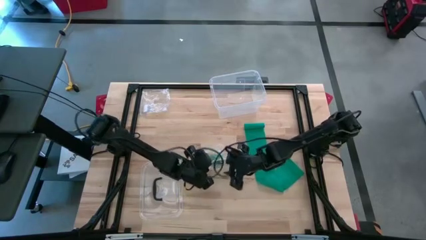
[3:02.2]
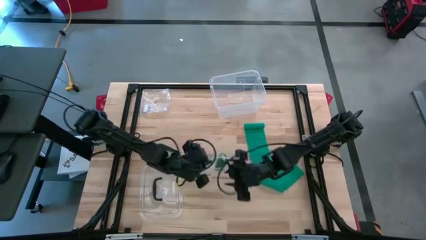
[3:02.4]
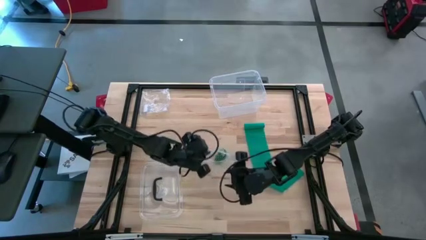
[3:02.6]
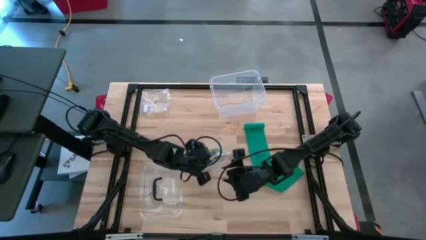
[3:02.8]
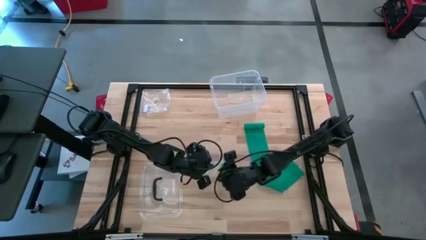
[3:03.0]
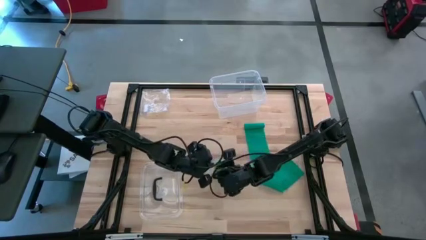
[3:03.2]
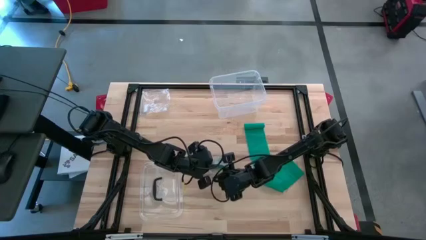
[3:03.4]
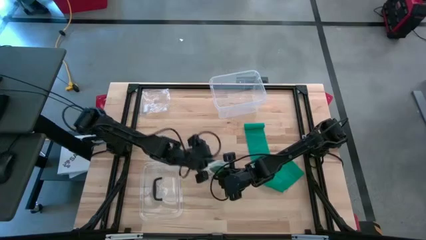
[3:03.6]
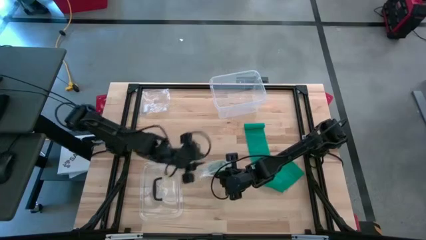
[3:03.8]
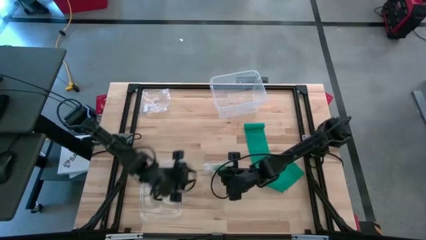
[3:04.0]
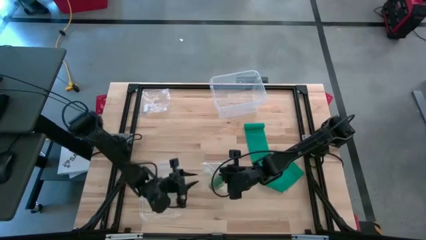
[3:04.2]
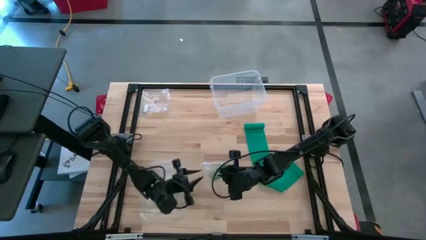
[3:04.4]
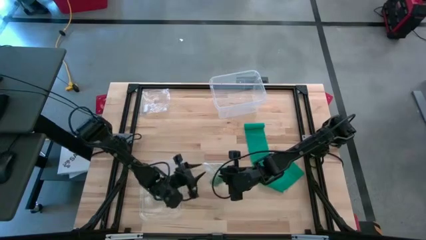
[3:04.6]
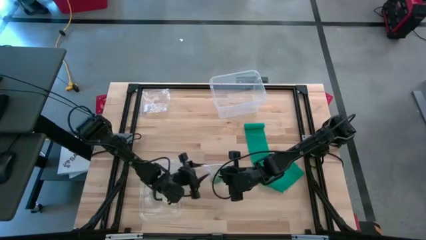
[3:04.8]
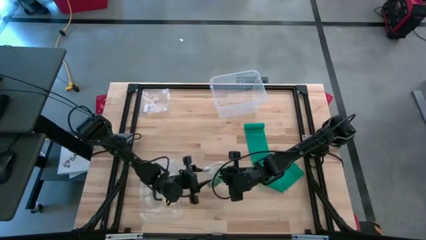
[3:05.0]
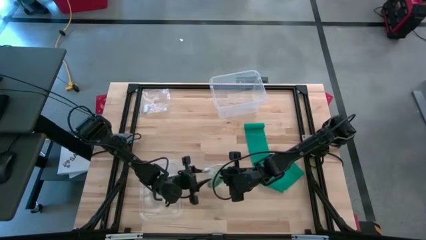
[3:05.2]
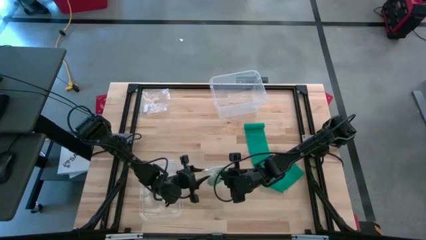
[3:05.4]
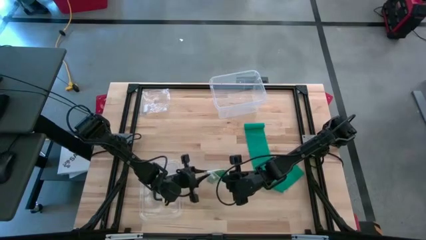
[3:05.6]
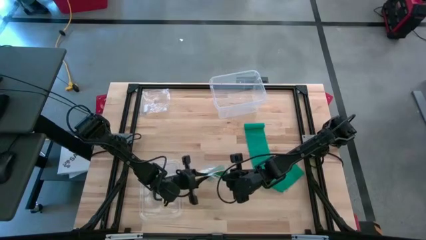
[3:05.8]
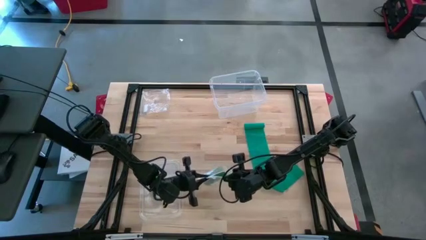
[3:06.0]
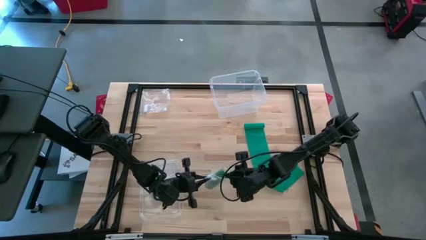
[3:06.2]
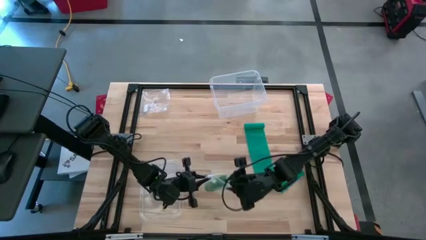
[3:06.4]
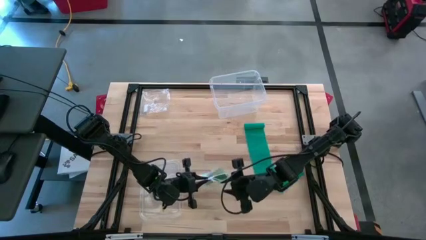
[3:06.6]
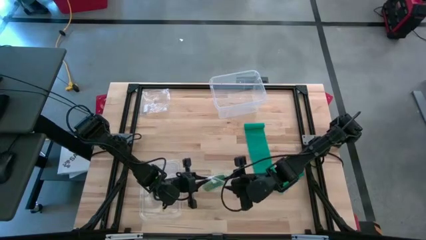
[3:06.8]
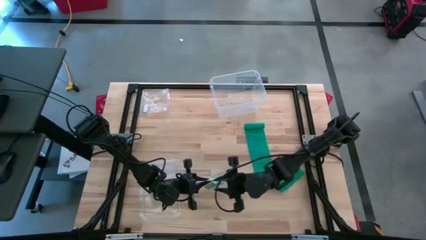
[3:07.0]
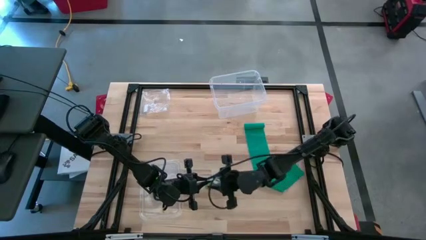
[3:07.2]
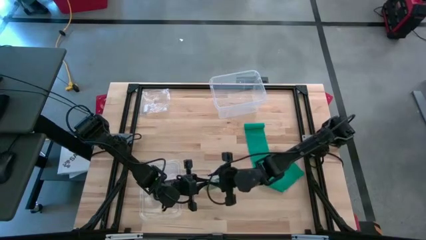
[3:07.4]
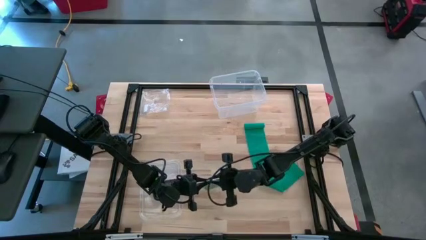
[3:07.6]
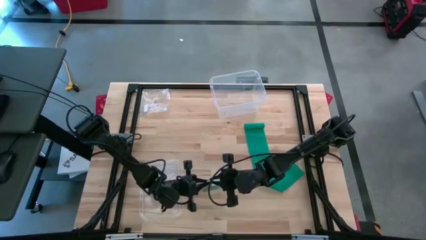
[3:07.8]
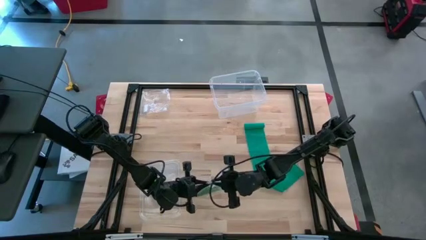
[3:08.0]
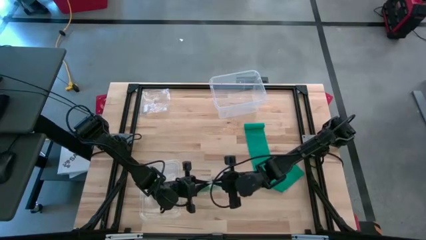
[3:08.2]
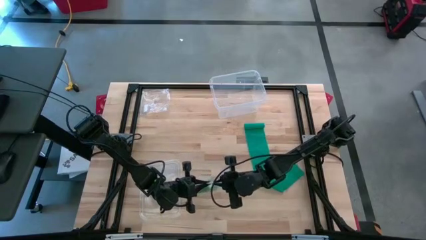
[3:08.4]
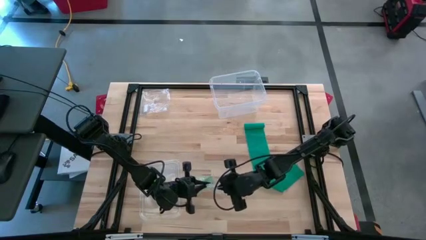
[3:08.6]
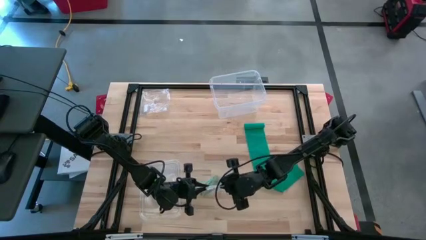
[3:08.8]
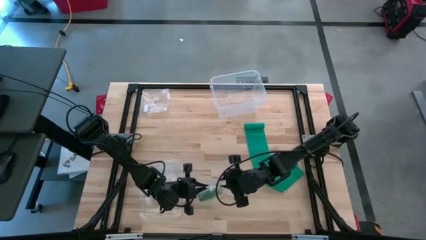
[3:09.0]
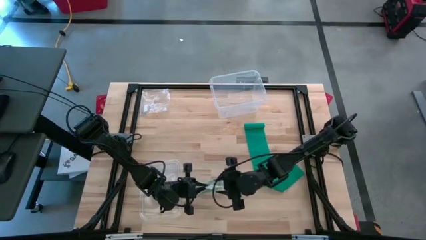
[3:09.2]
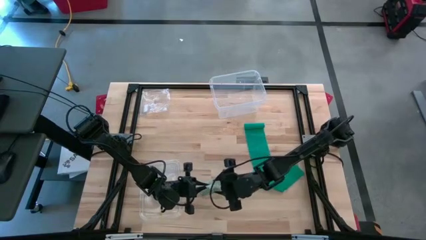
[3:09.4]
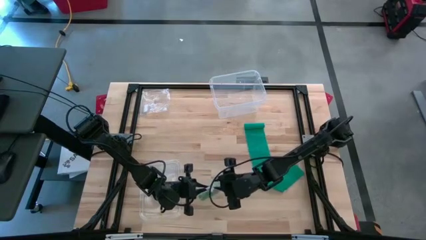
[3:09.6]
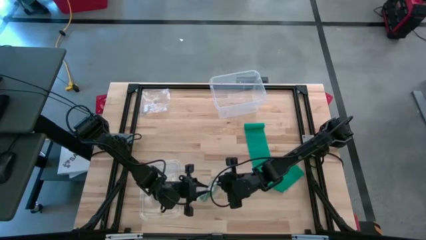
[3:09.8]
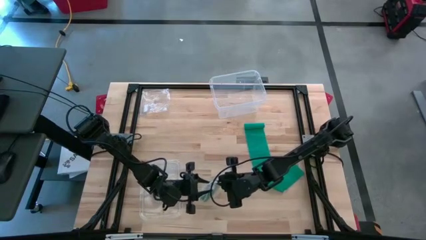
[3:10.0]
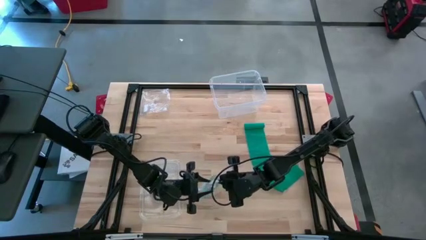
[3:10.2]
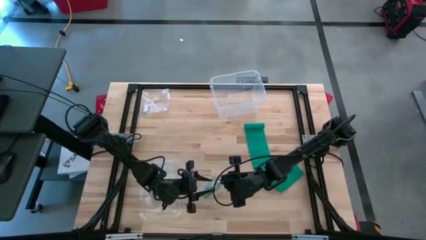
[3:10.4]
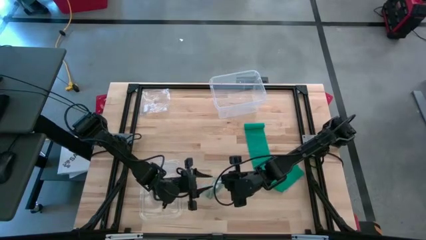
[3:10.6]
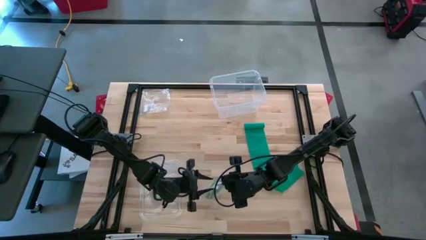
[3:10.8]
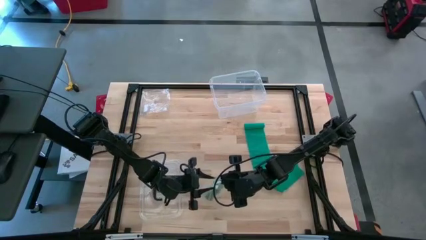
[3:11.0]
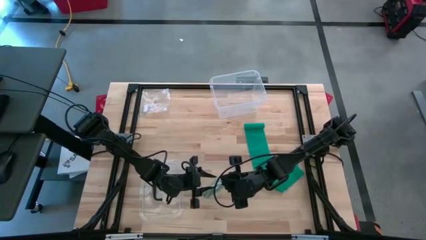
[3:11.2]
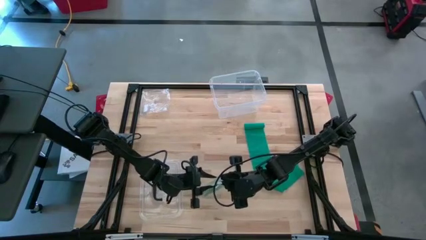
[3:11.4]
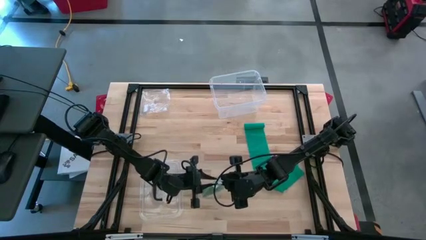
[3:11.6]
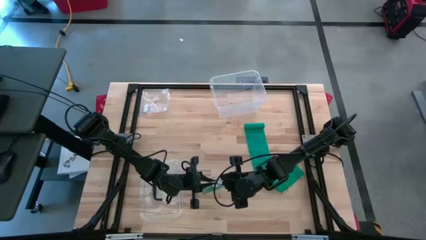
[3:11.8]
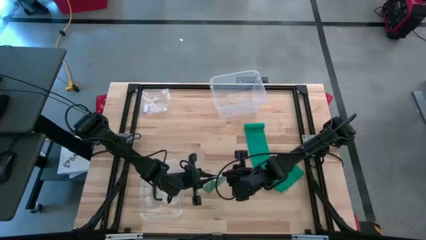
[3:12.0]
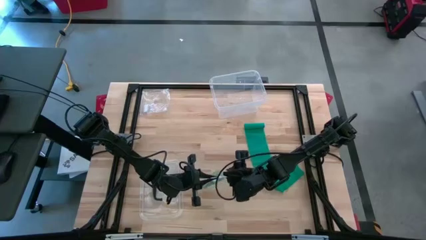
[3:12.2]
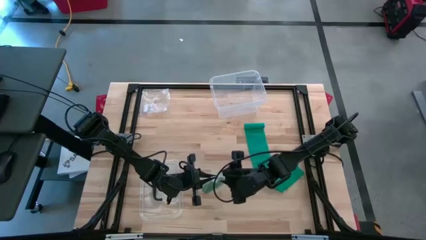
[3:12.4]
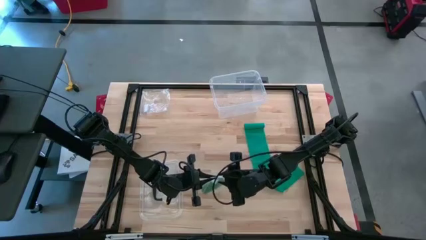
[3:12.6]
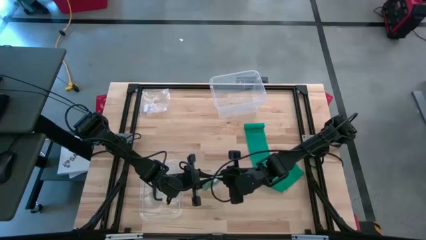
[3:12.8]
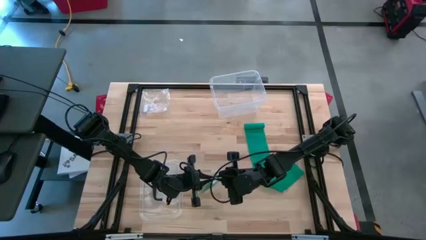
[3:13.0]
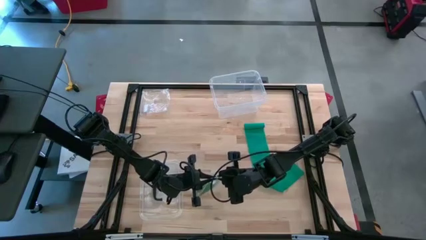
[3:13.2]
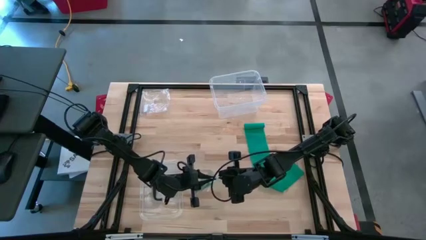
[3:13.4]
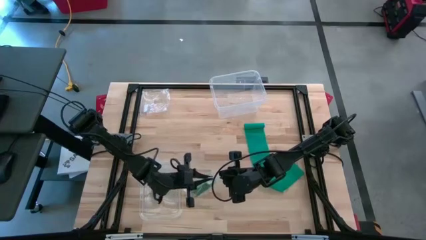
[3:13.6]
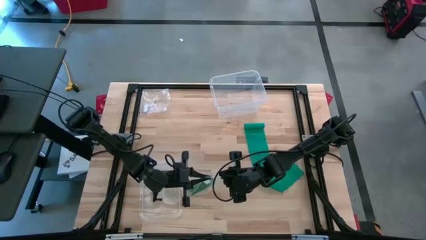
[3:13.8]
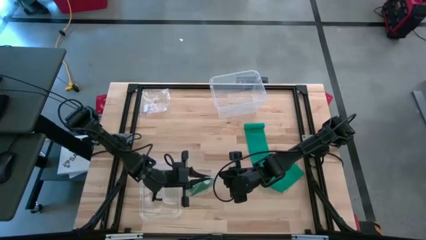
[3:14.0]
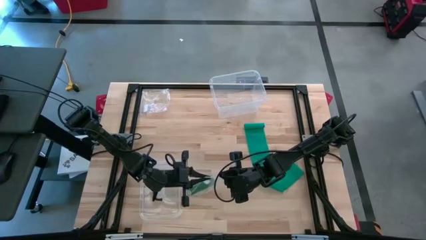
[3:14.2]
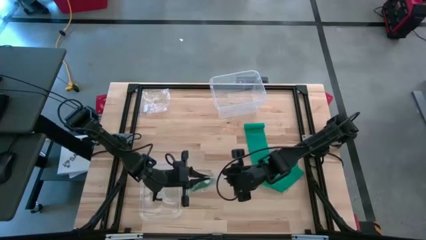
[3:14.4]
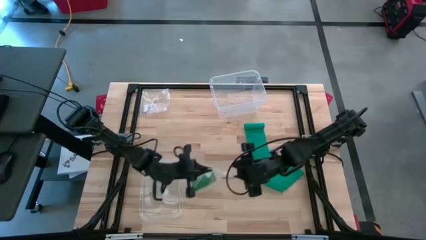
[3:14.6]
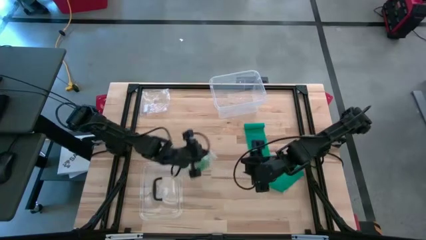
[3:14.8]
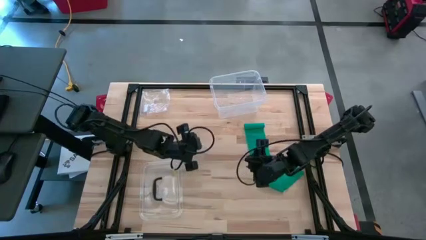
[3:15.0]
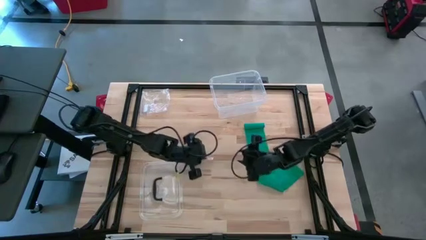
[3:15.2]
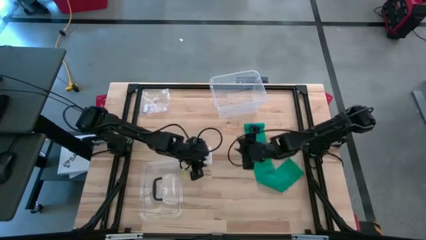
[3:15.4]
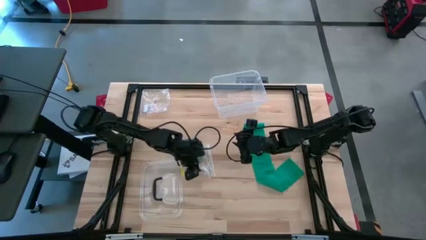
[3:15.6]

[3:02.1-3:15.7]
Task: Roll bandage
Close the transparent zip bag

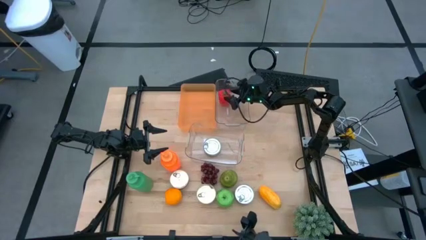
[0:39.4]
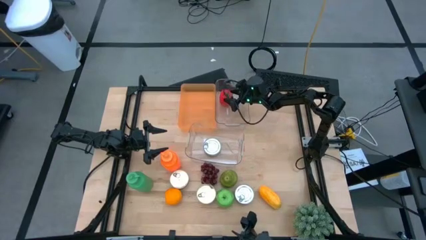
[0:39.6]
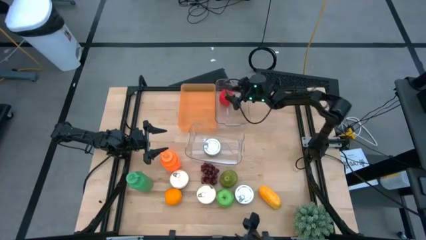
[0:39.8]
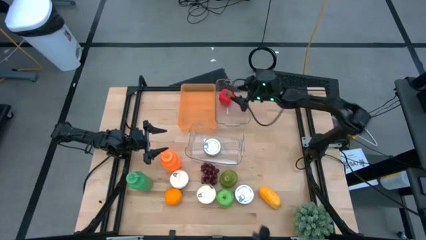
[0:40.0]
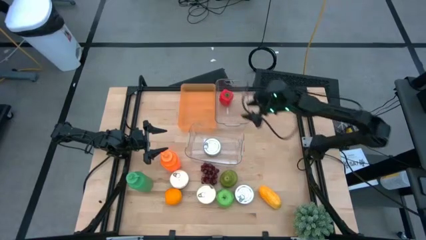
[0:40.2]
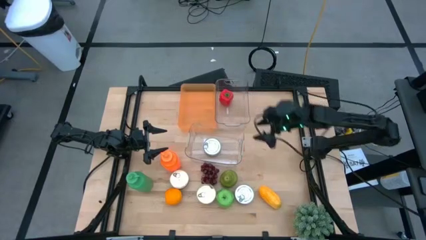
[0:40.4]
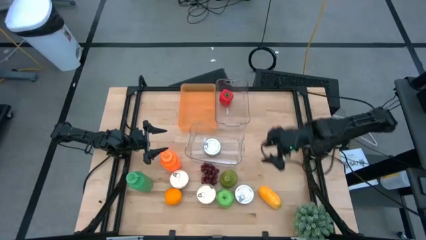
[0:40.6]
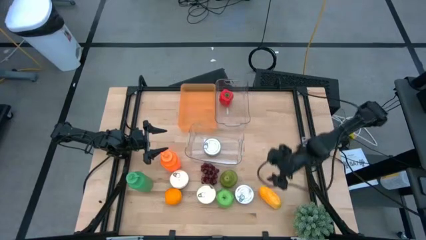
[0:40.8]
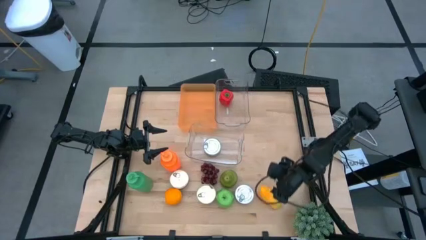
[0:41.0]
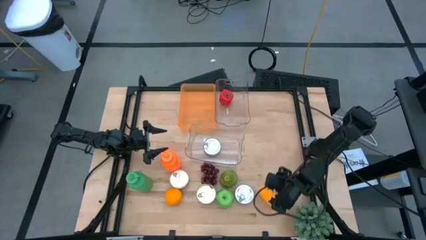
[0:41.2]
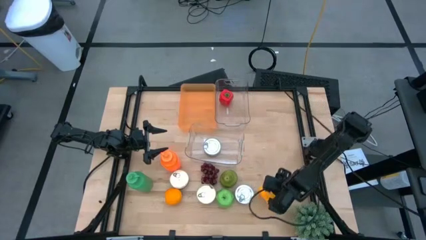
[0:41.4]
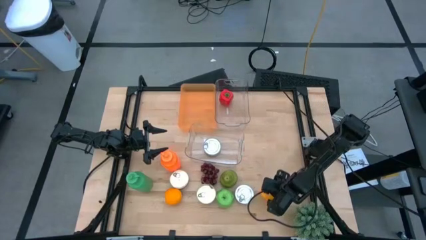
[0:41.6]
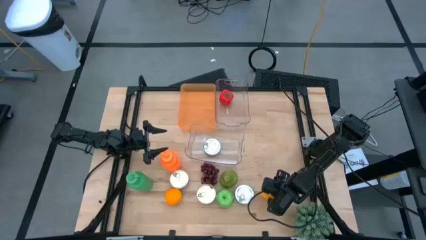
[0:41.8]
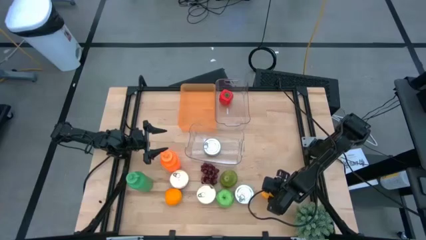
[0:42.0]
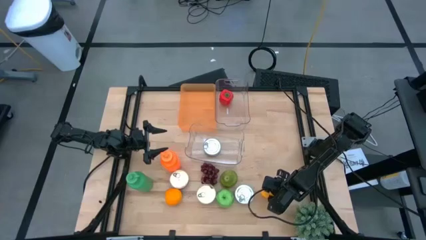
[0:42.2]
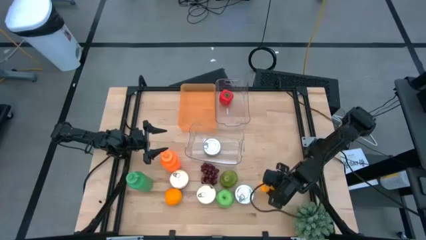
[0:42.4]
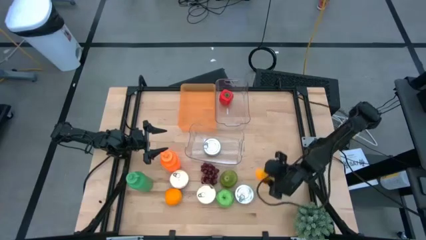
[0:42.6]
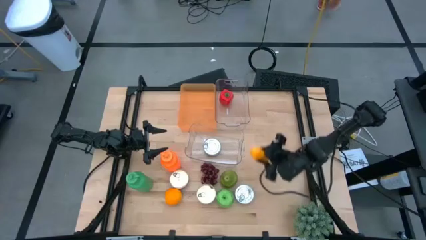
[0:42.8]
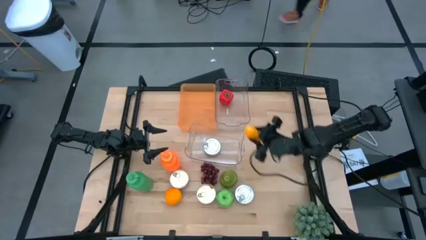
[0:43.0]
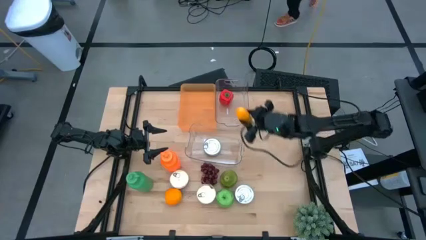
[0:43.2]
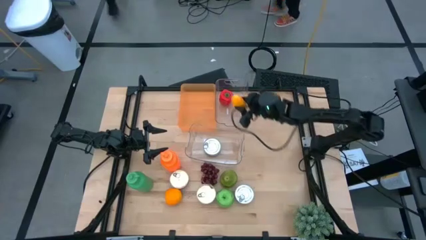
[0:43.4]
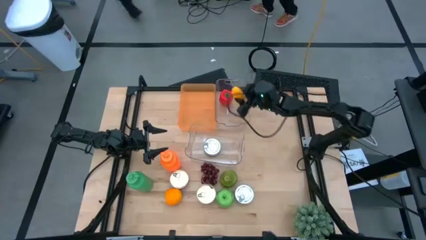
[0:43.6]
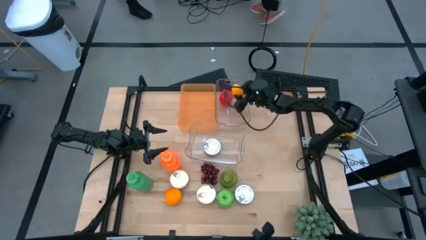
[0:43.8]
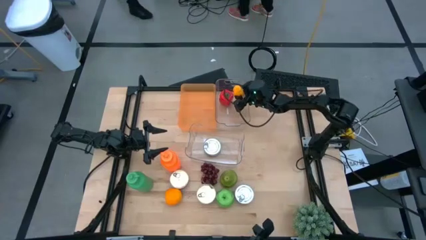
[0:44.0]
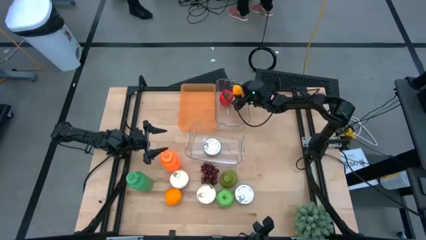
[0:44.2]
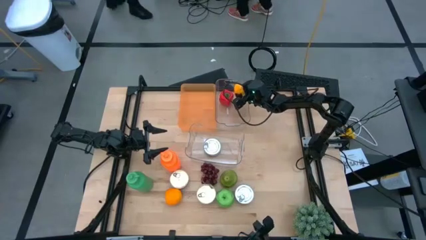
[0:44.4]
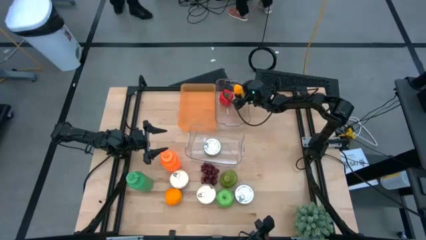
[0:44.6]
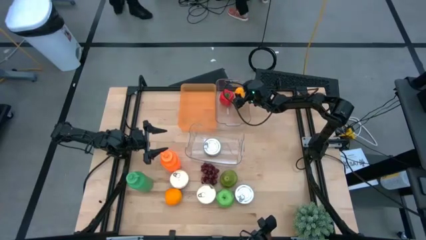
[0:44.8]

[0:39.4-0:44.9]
Task: Pick & Place Food Item
Put the mango into the top transparent bin
